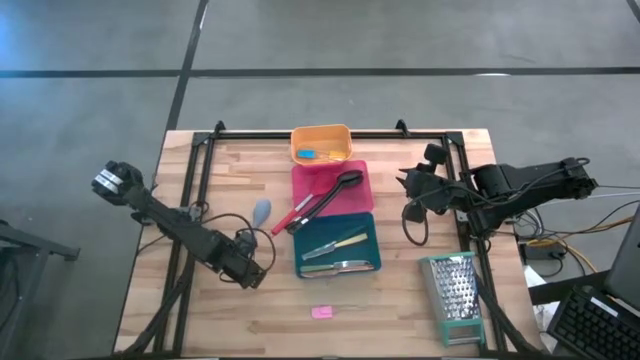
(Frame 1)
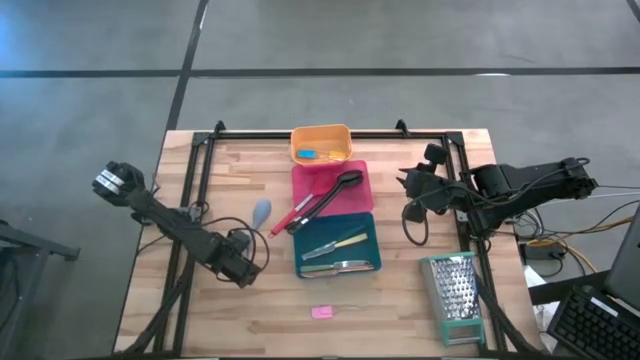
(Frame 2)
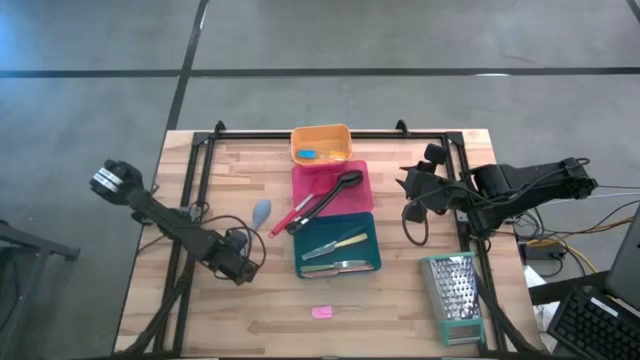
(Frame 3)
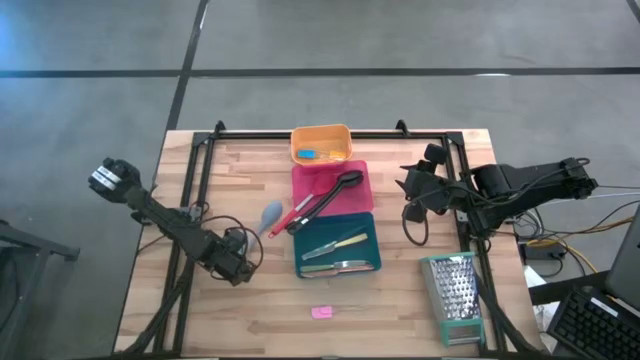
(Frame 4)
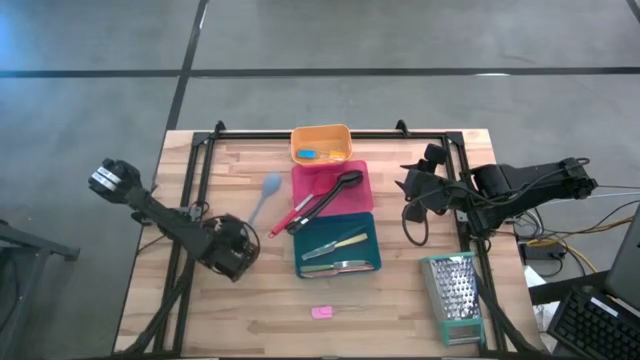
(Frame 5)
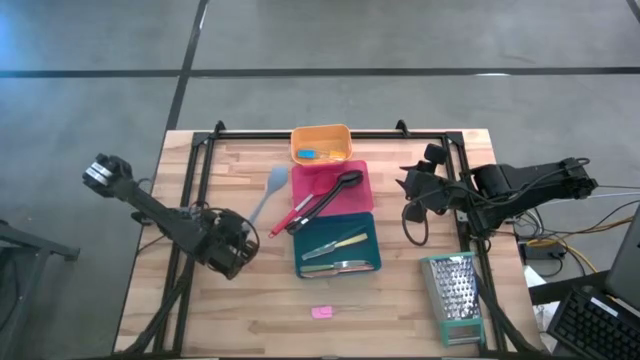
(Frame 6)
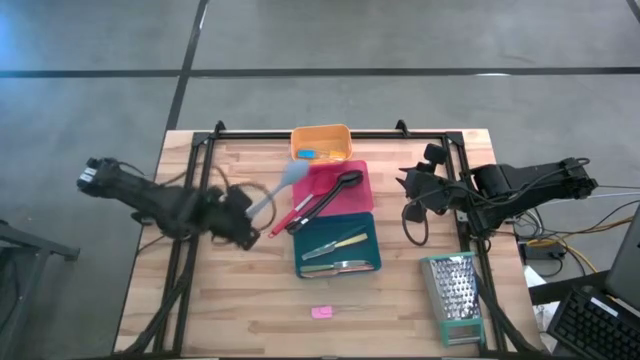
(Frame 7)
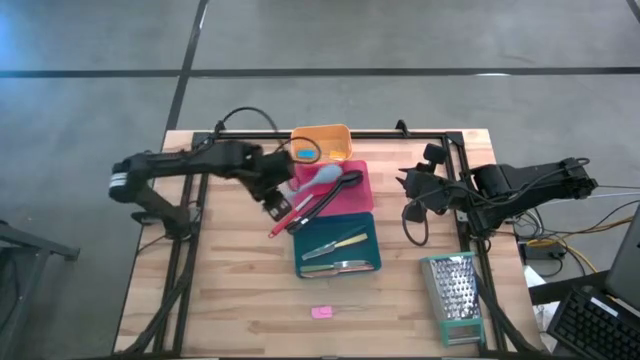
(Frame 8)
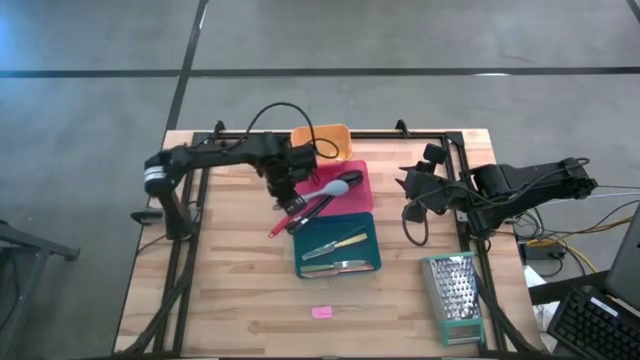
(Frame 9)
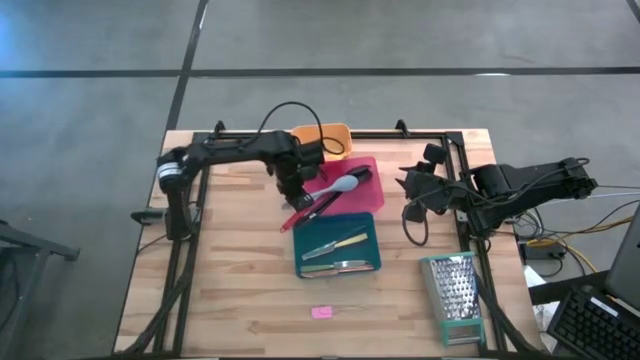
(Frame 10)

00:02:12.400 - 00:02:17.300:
Task: Pick & Place Kitchen Items
Put the light blue serving spoon into the pink bin

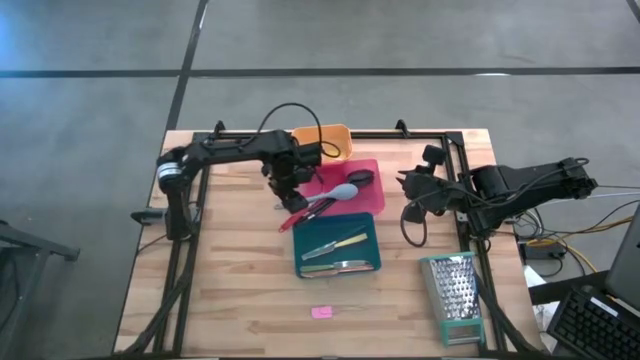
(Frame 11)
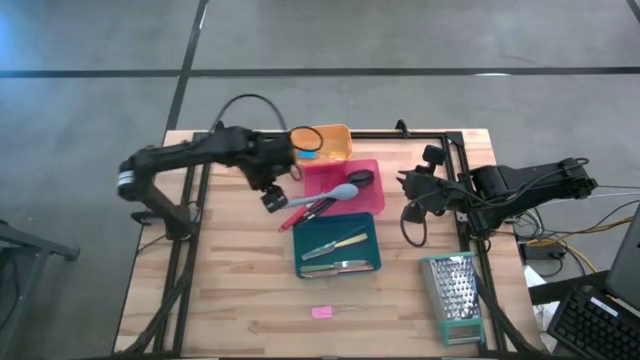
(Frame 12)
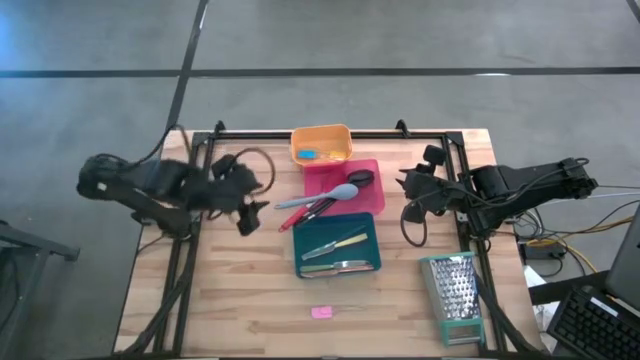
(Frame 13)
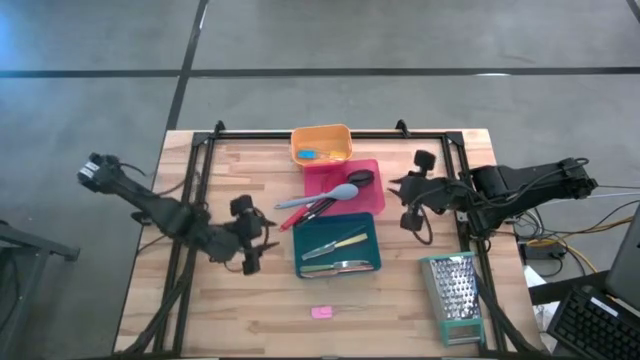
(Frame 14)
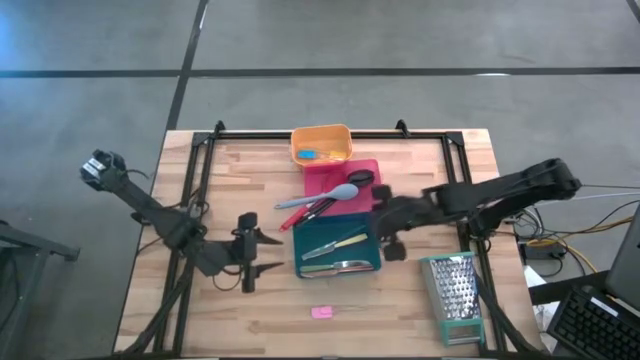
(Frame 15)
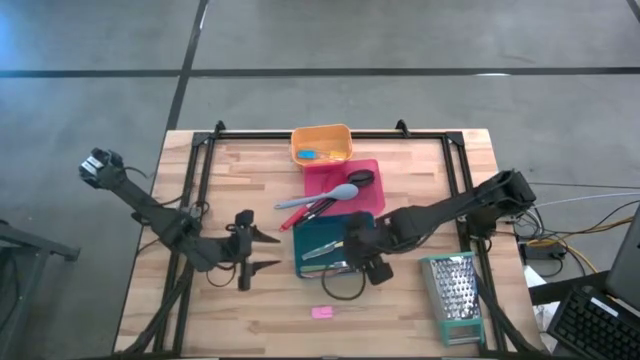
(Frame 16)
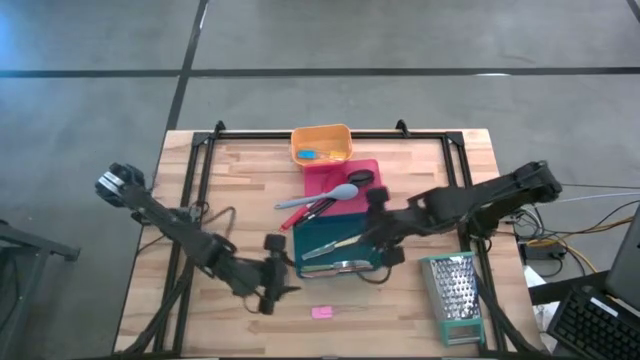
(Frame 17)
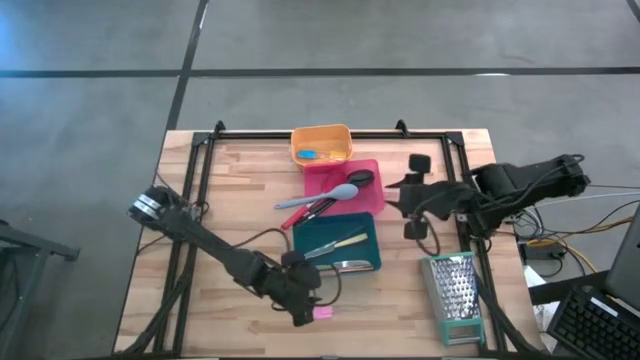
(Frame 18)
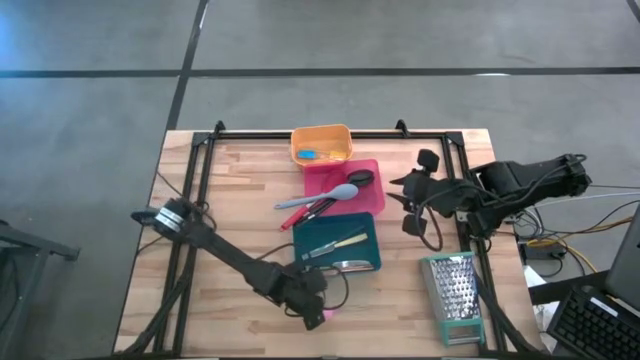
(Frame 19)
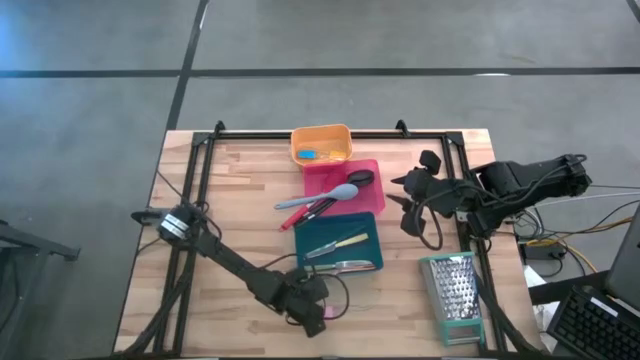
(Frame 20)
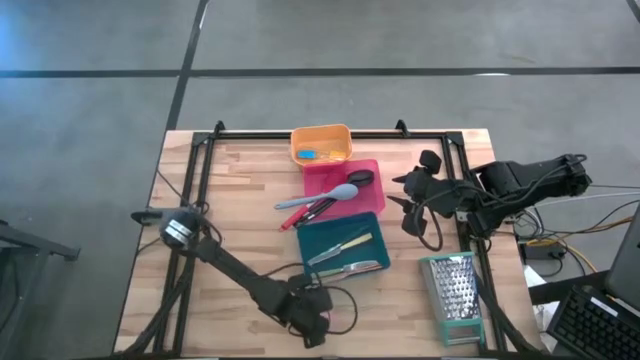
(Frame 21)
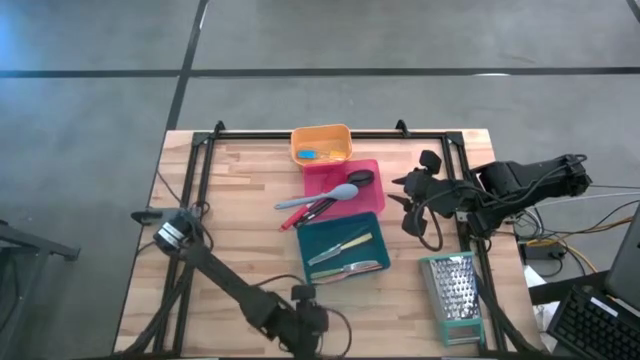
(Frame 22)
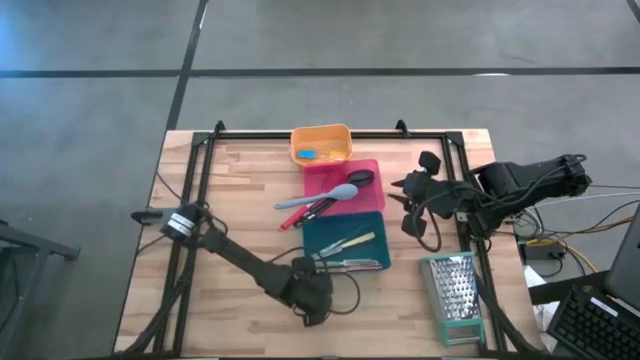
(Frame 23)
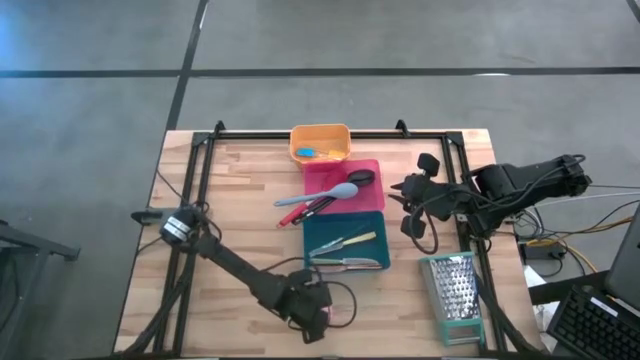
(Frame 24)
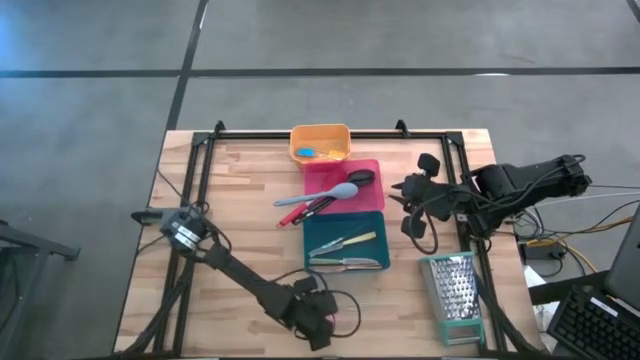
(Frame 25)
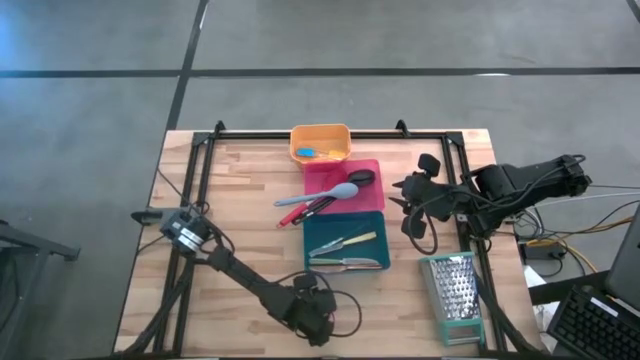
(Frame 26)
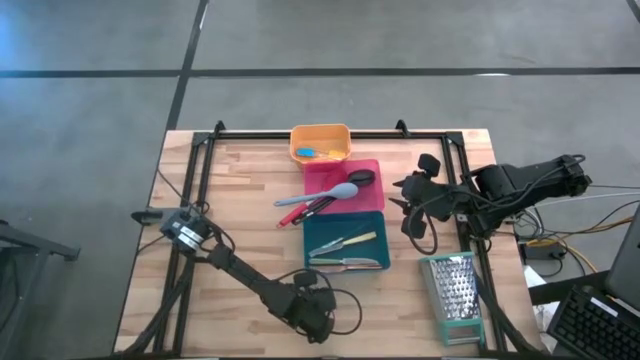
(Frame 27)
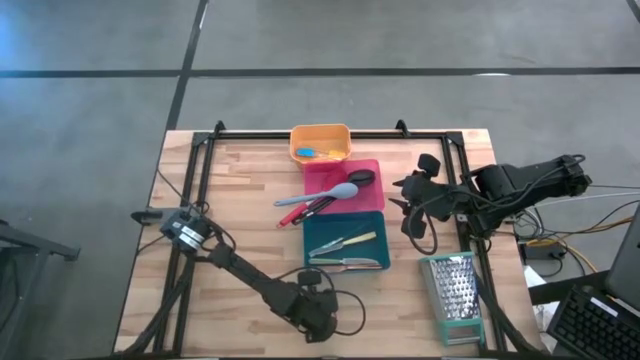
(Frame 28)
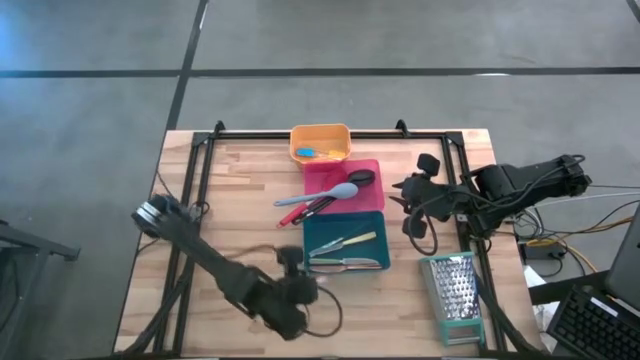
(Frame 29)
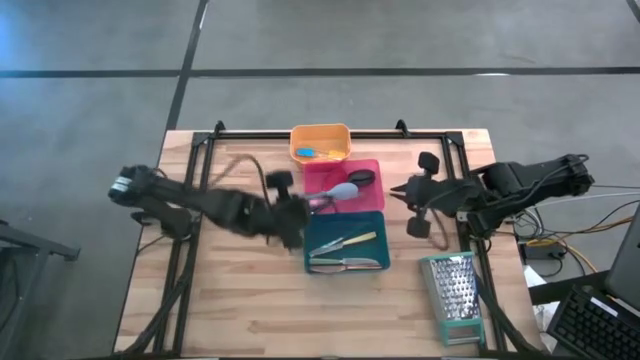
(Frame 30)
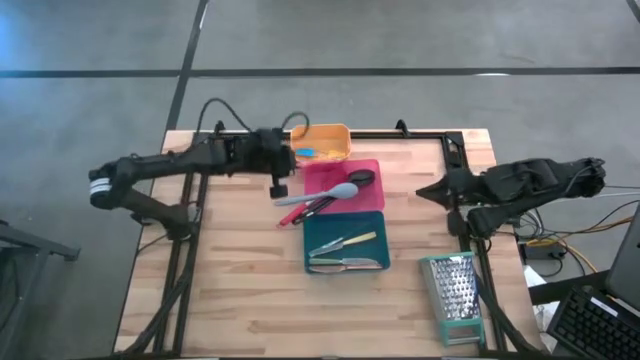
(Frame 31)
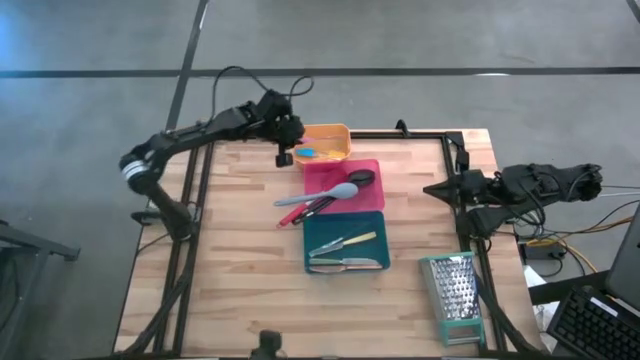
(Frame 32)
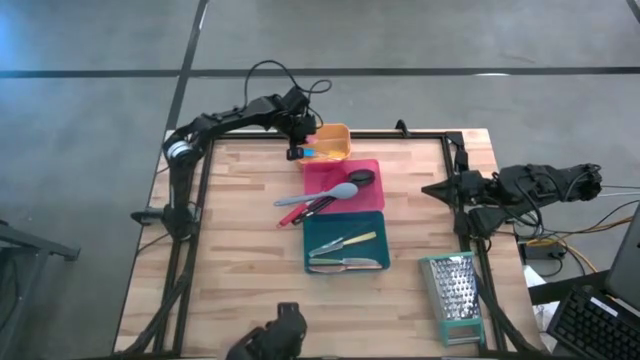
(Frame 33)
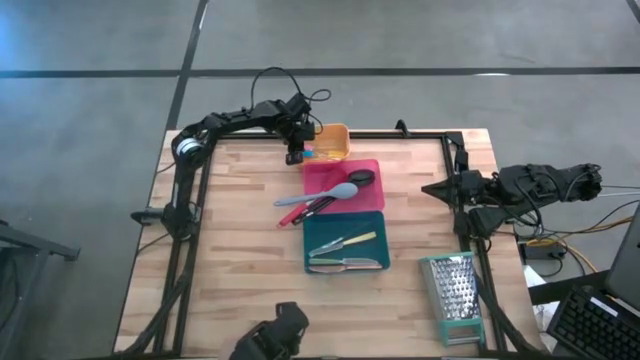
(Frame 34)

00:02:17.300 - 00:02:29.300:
Put the pink spatula into the yellow bin

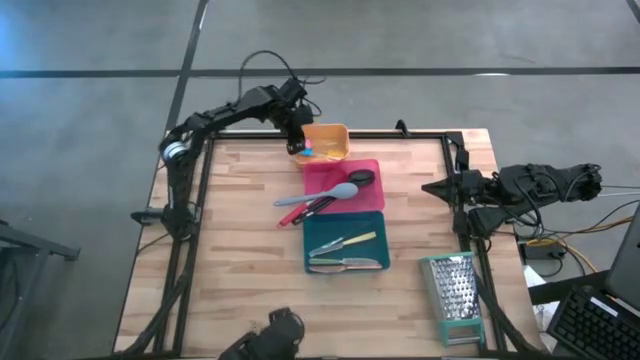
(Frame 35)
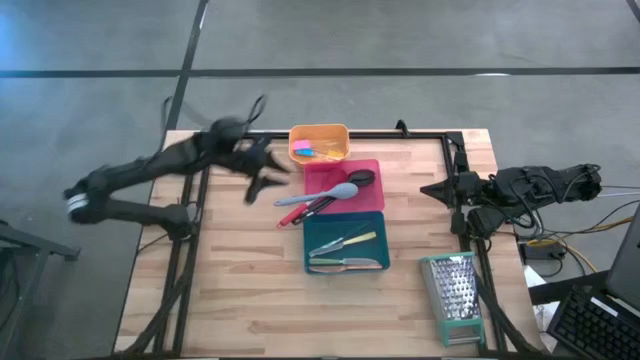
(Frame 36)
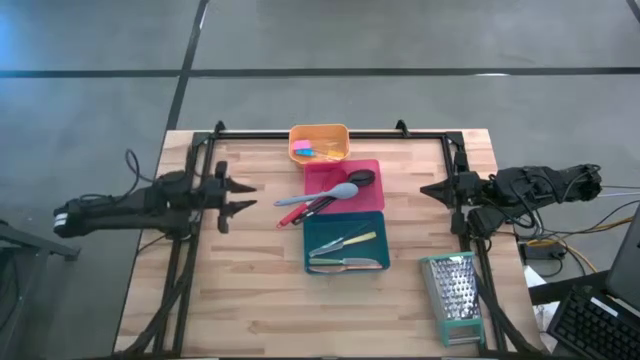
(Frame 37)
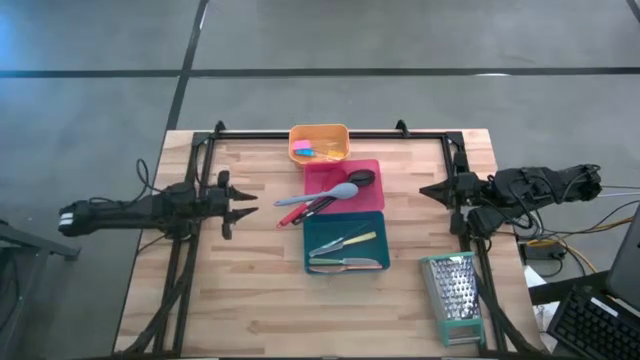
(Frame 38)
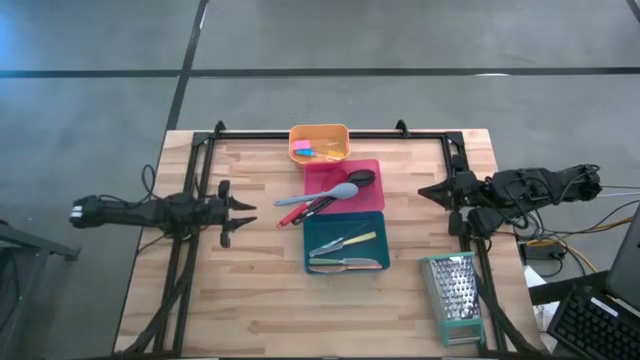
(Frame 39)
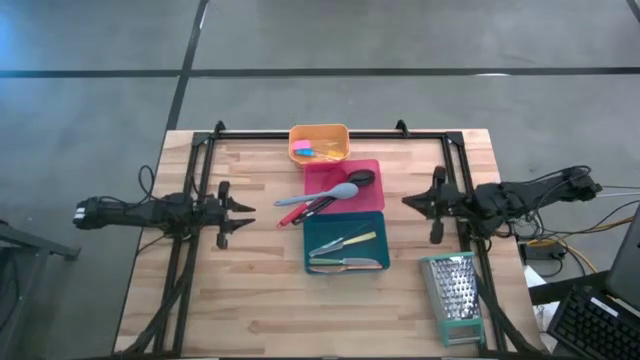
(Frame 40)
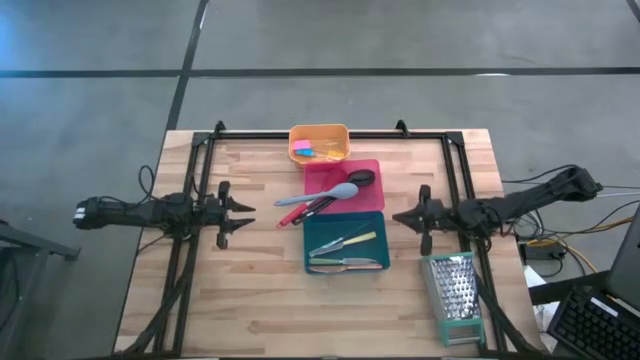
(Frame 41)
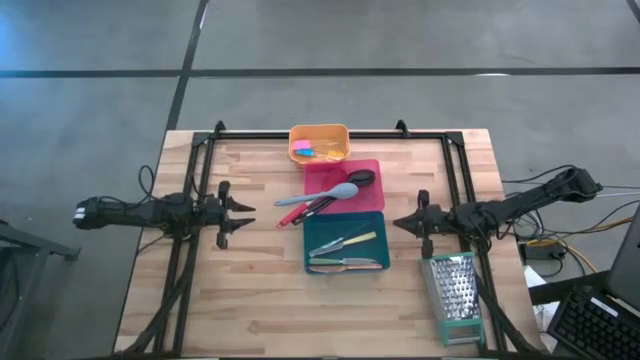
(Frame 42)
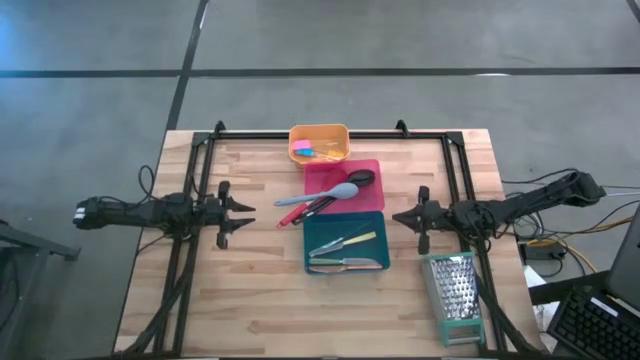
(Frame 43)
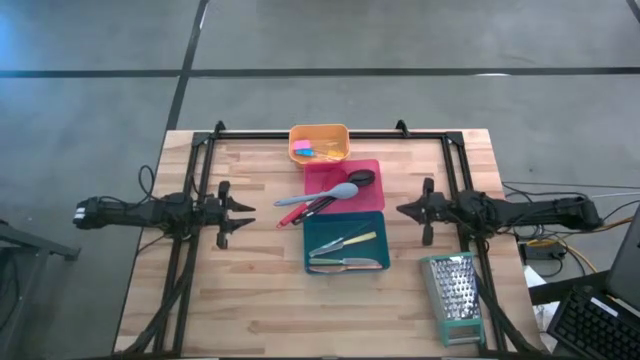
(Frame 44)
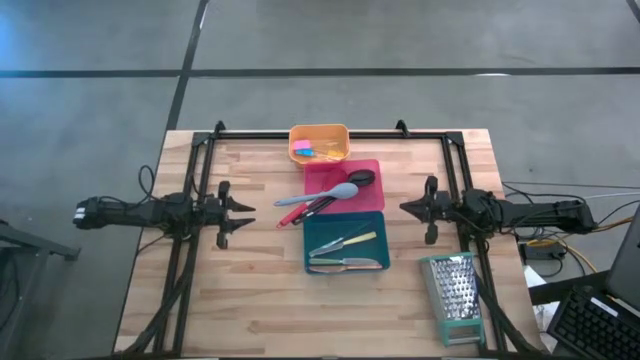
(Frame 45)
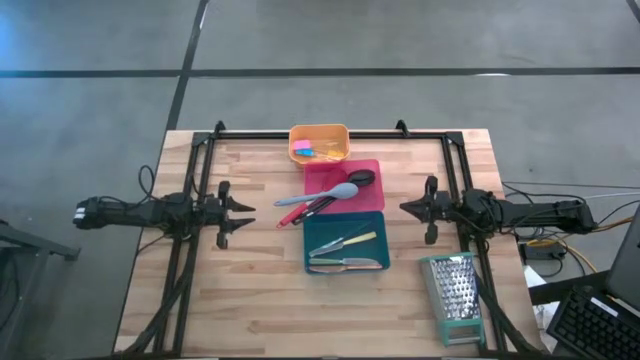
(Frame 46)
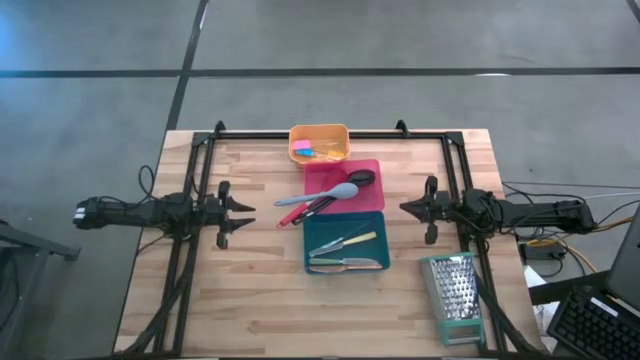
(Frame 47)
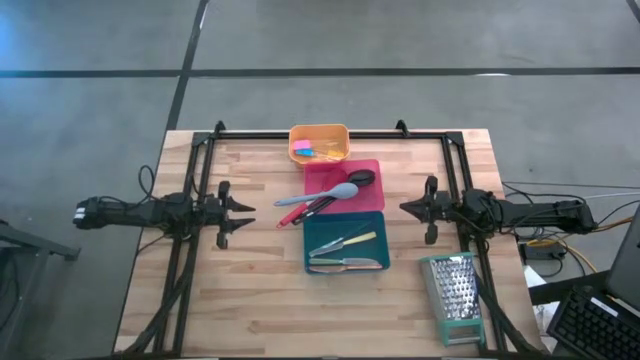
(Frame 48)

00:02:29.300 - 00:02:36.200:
Return to Home Position
